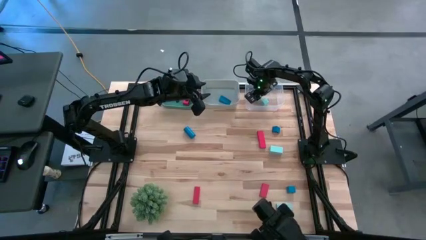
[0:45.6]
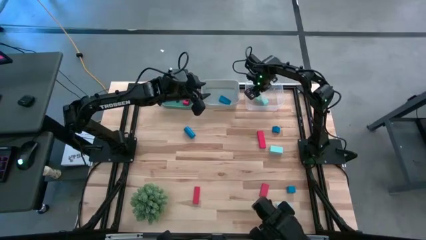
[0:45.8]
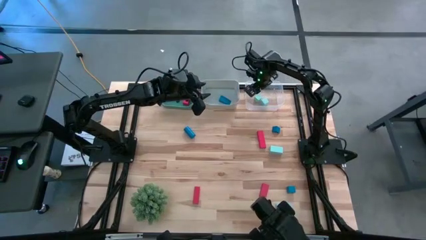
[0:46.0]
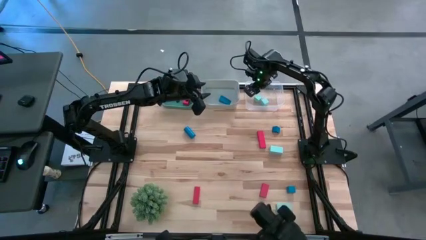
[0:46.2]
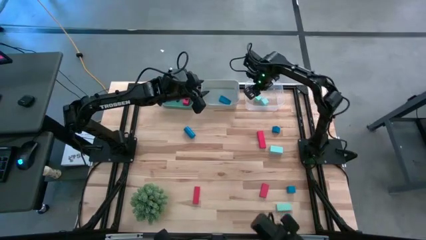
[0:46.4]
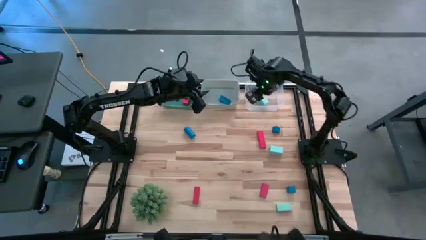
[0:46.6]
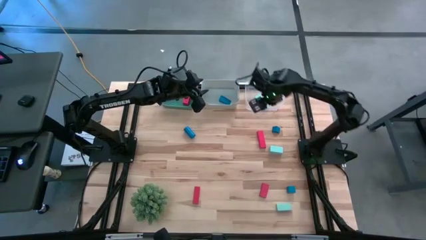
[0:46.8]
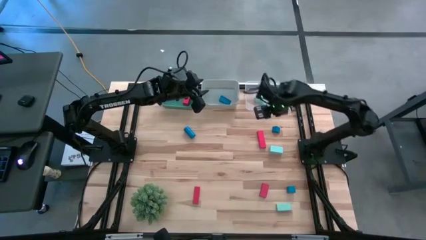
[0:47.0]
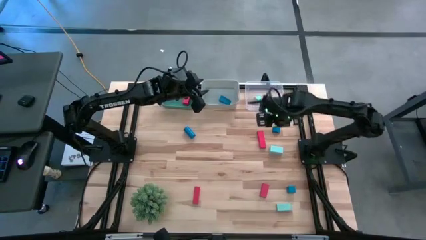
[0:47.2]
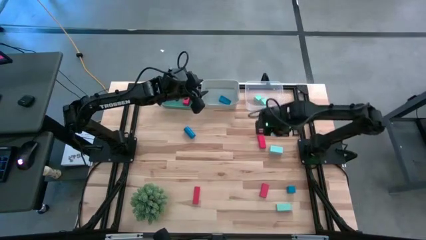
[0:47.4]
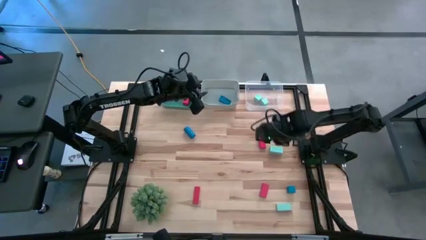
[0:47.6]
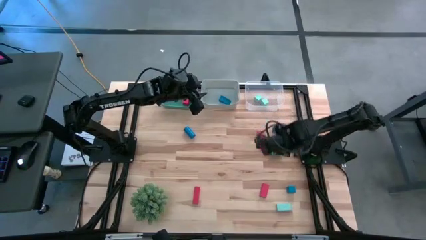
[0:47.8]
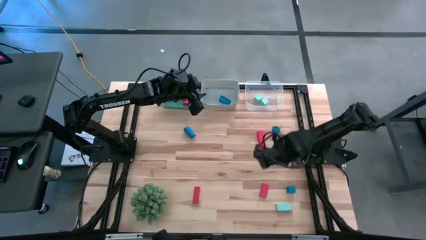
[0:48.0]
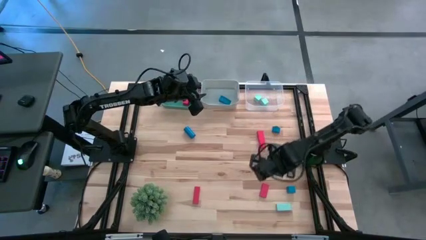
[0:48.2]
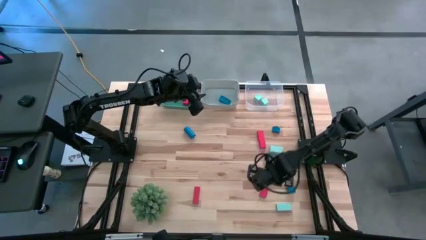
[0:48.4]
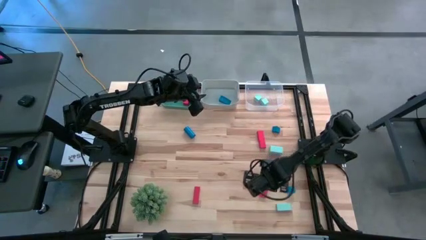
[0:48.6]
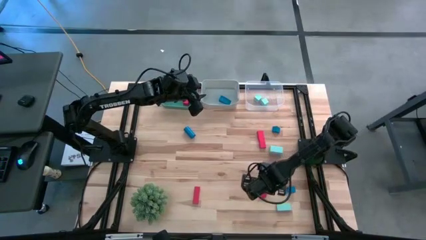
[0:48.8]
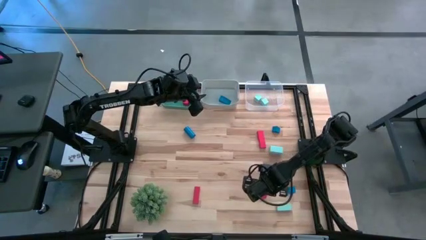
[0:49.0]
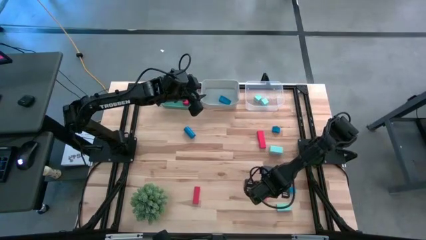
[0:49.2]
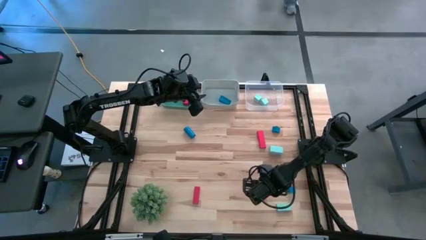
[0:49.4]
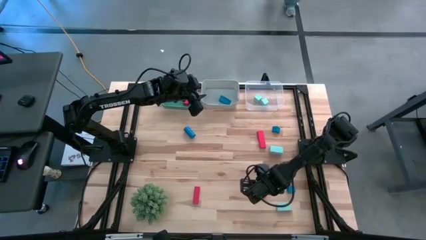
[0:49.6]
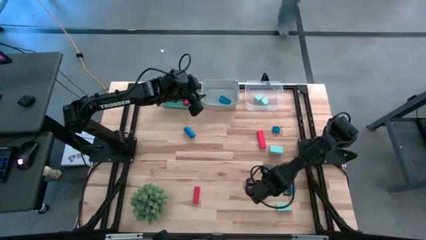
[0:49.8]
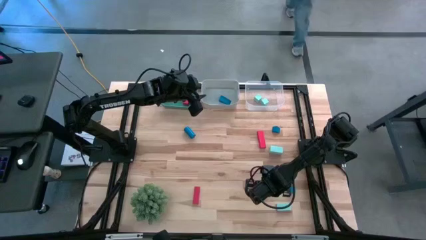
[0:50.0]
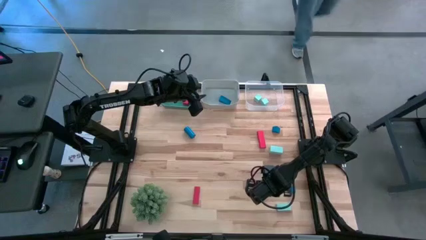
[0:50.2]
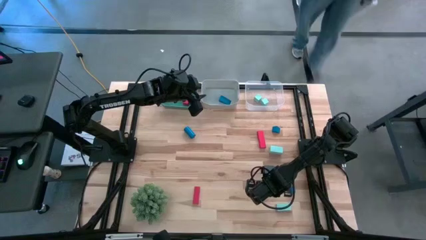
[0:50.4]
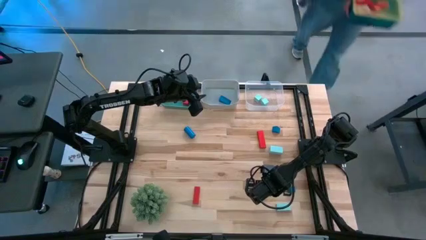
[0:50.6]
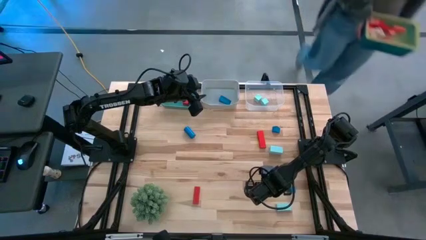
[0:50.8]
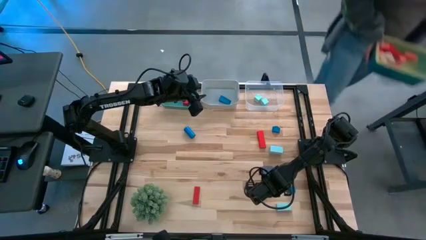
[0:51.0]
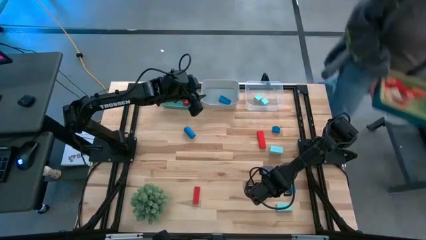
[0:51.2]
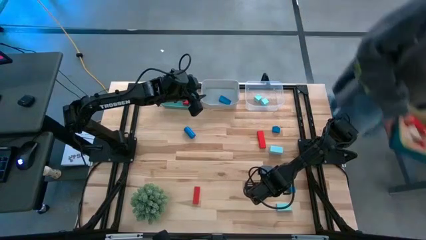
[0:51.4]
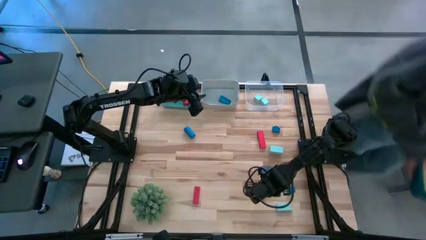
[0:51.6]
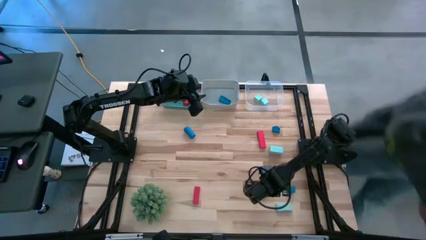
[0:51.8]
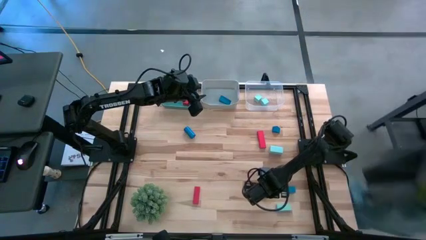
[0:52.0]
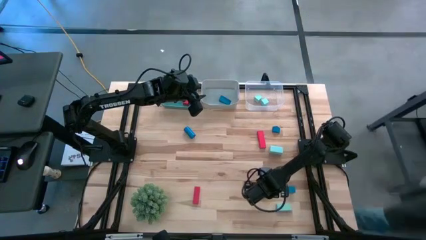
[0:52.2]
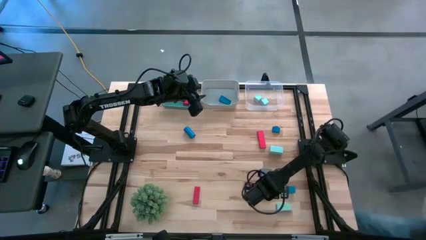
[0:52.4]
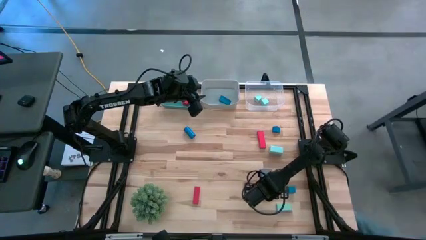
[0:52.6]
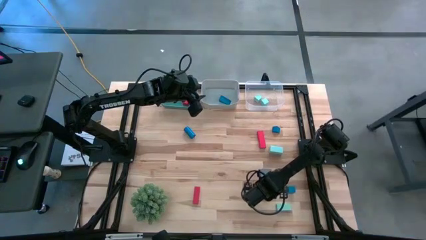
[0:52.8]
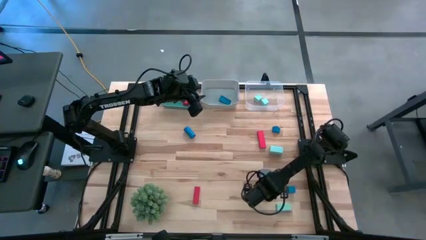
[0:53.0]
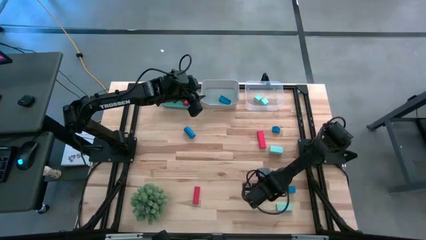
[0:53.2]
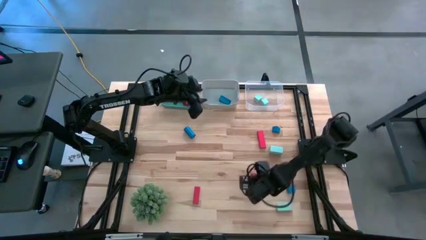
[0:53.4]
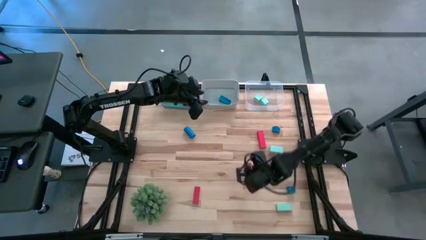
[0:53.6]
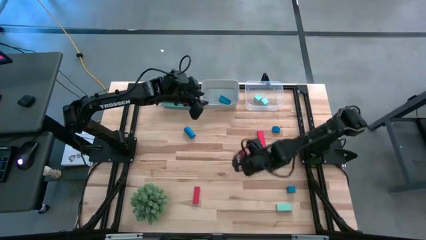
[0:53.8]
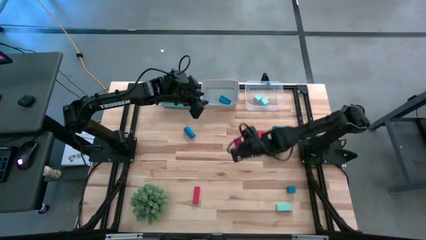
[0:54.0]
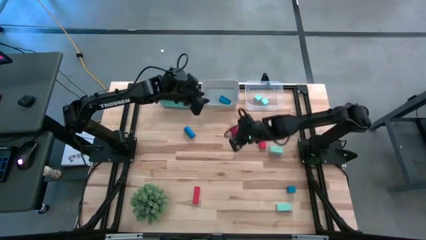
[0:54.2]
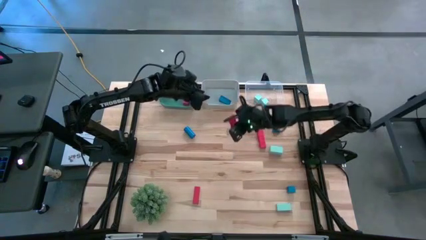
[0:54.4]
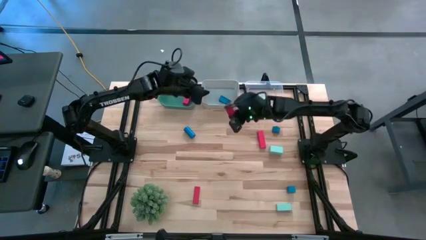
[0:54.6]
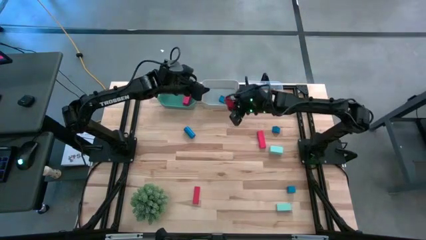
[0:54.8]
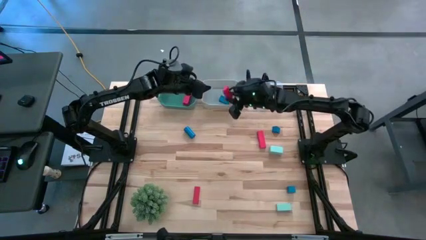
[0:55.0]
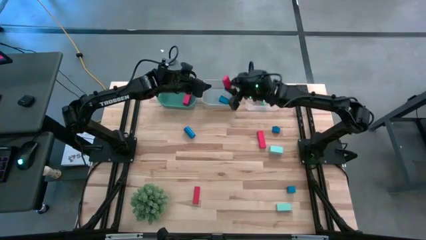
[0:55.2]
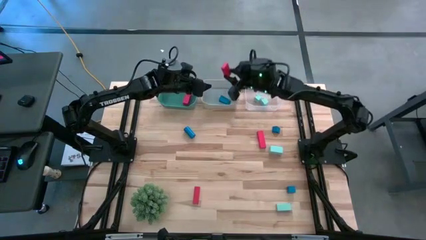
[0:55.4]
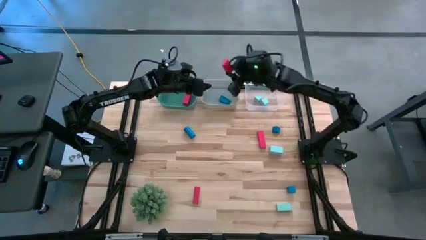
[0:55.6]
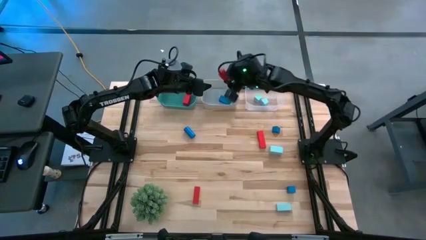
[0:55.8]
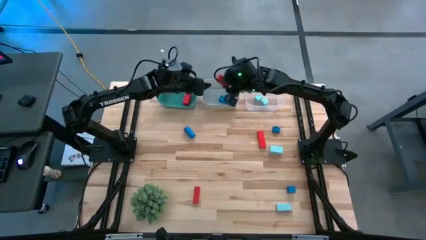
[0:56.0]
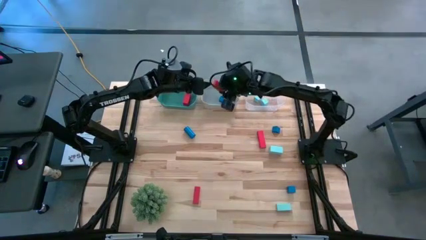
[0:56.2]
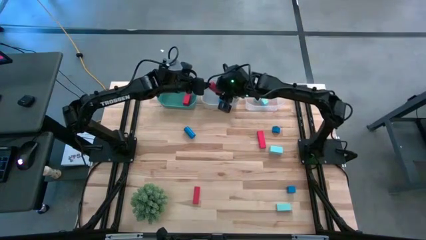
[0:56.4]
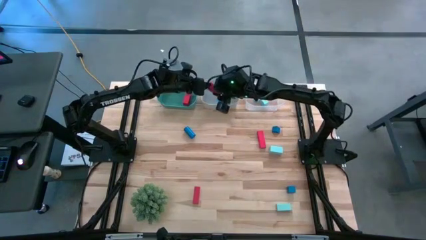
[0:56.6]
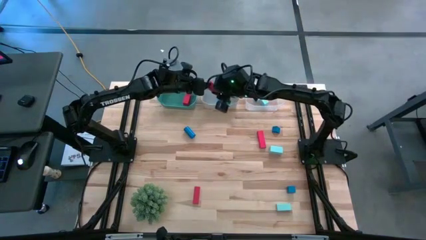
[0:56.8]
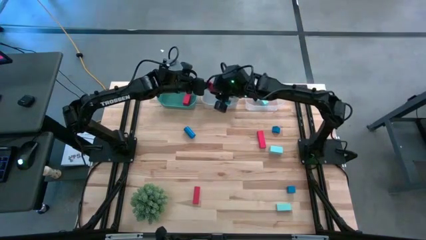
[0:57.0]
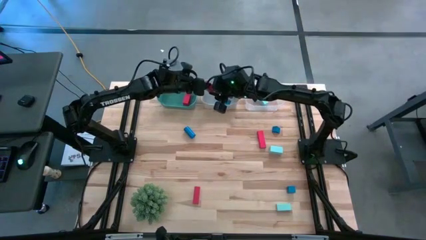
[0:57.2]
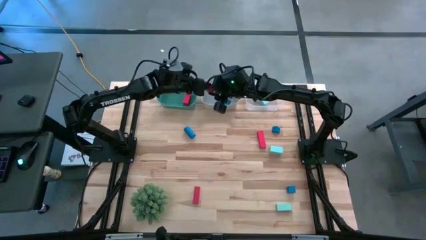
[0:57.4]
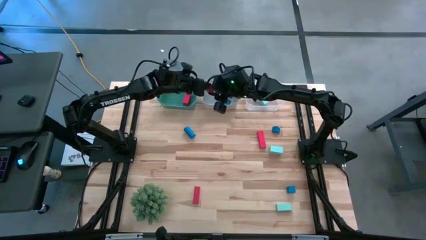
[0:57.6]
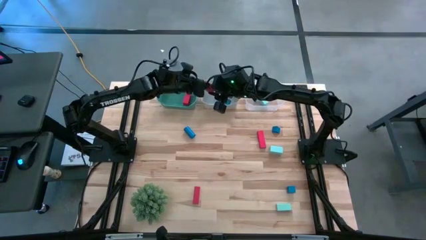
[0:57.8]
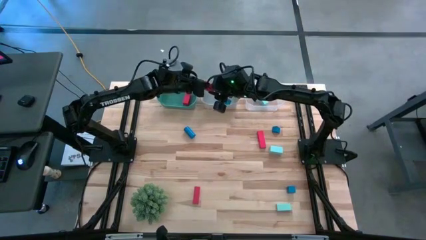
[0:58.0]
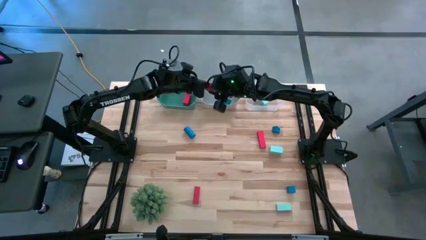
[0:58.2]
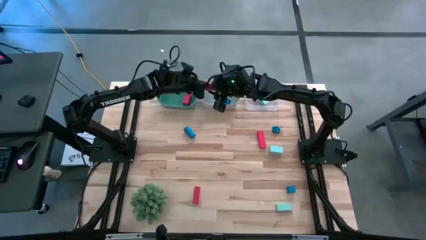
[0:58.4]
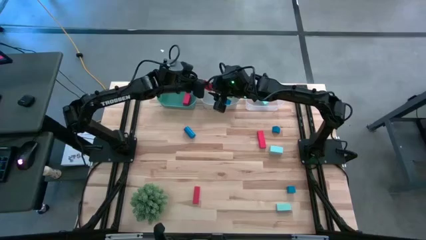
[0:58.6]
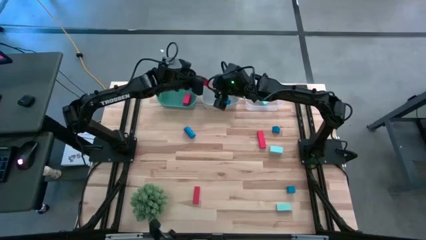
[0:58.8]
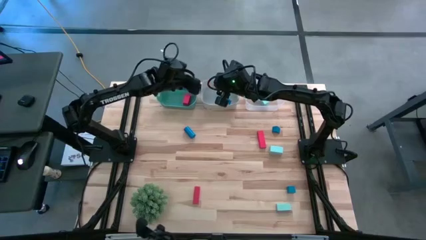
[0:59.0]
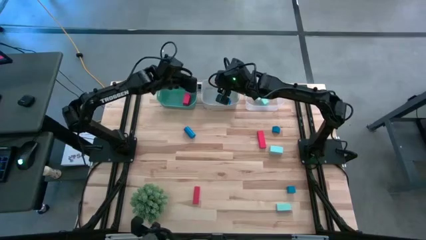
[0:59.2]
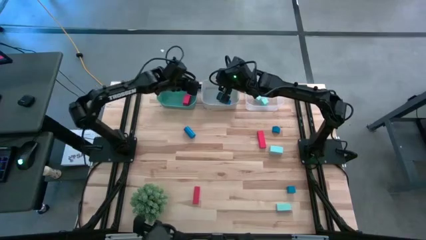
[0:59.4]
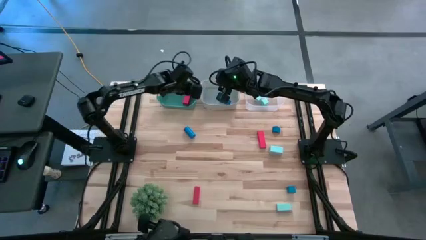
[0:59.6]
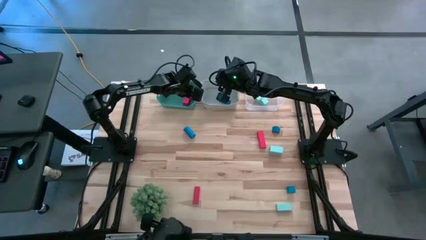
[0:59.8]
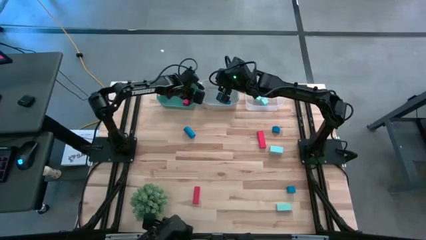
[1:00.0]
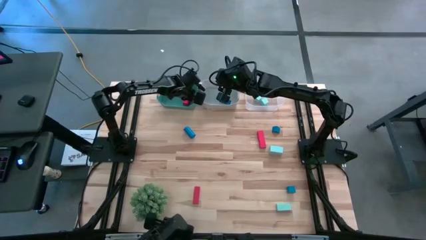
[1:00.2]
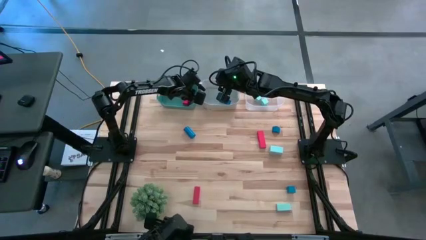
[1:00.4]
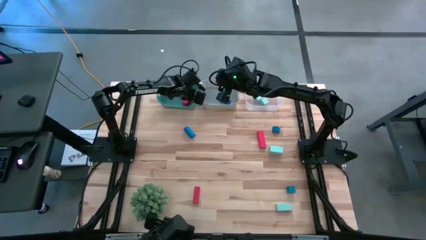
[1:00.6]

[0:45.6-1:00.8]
Task: Sort & place blocks by color
Put the red block into the green bin
